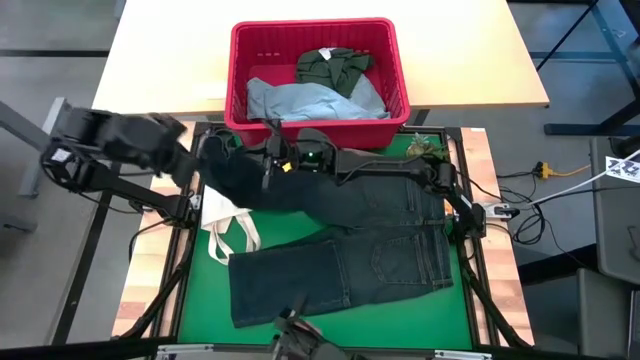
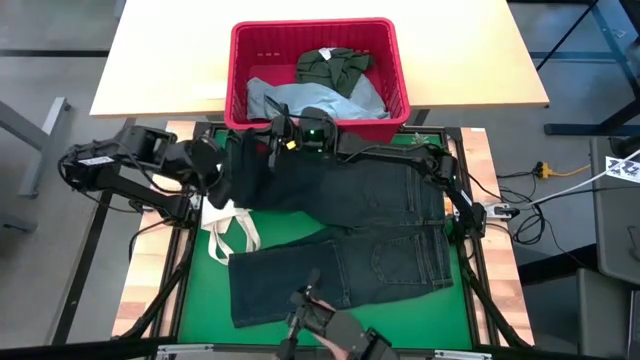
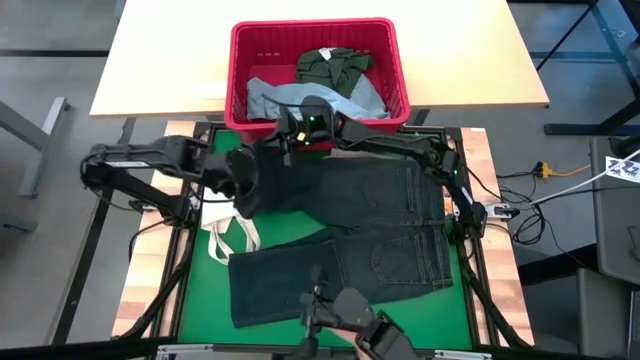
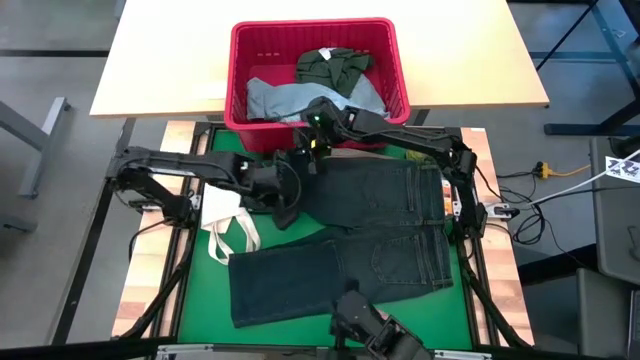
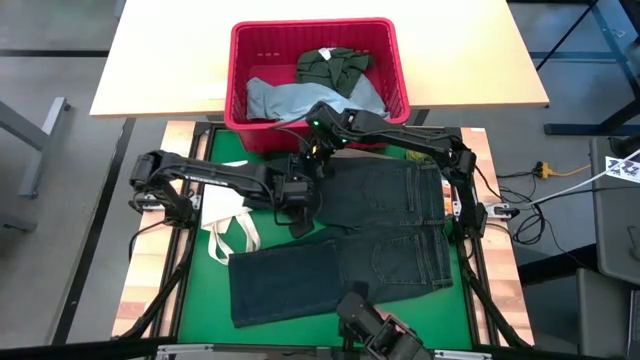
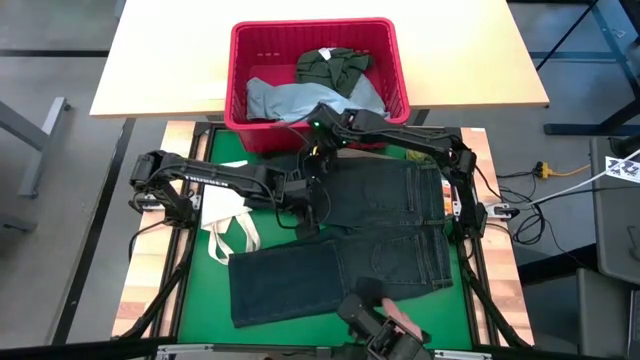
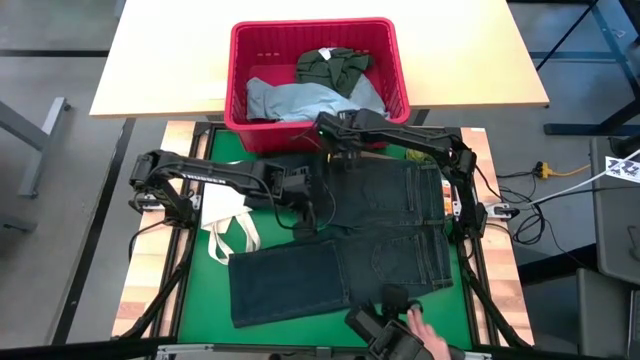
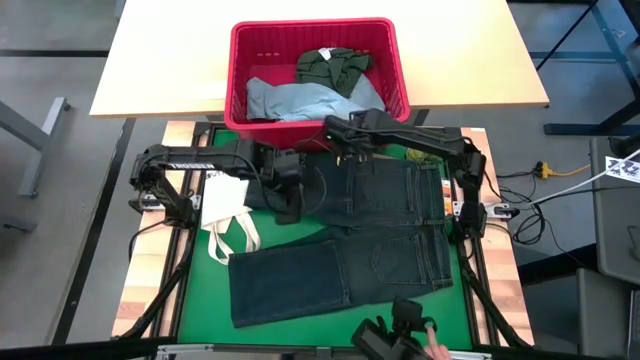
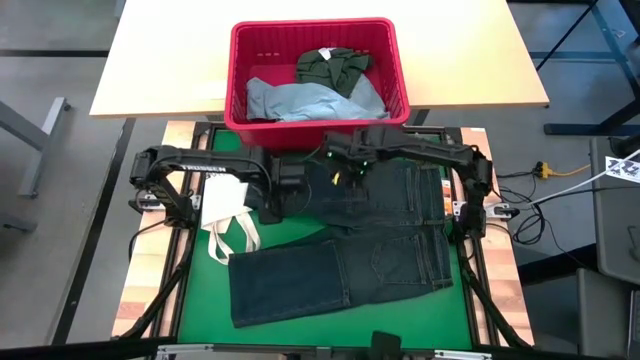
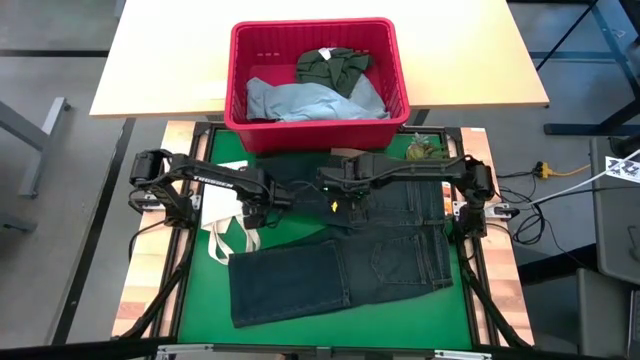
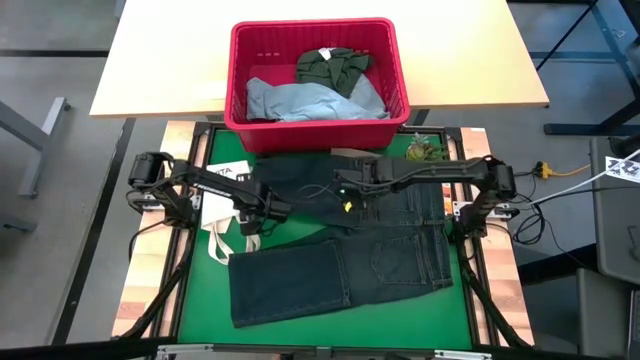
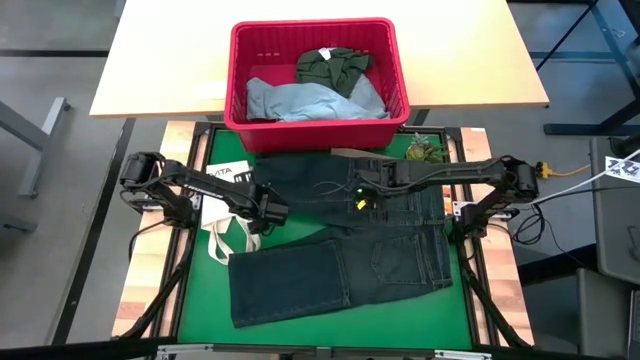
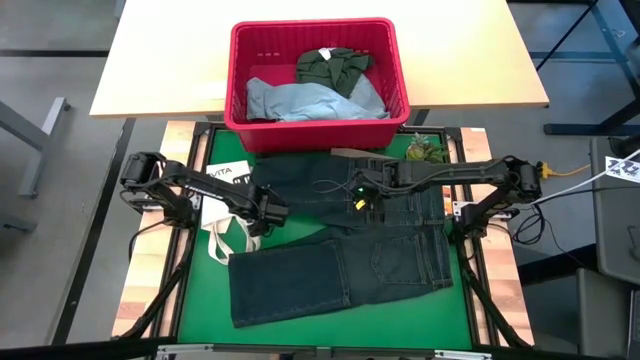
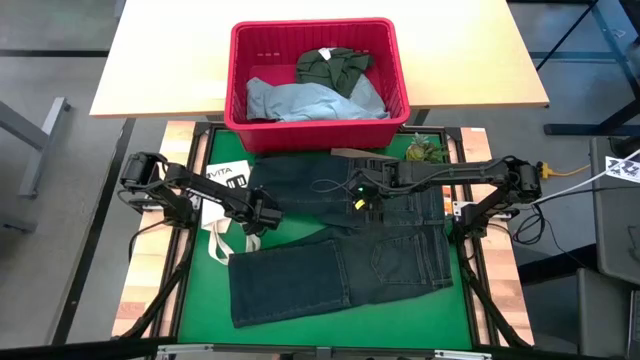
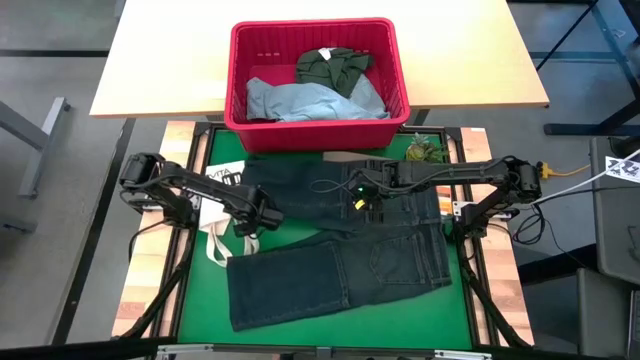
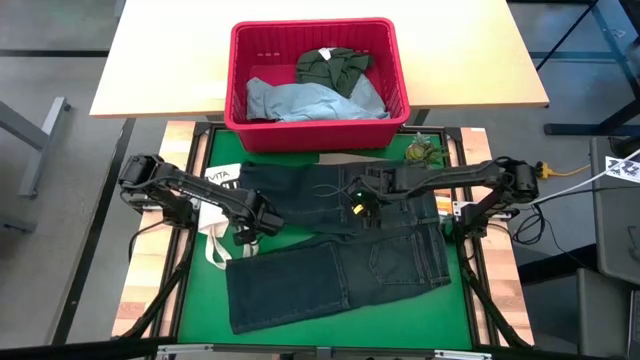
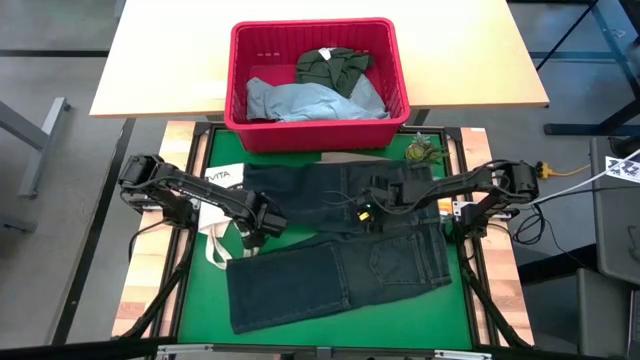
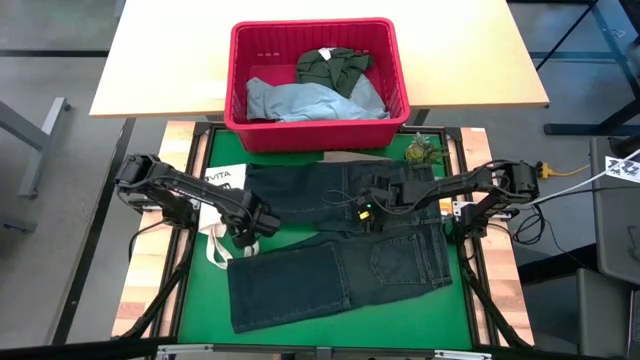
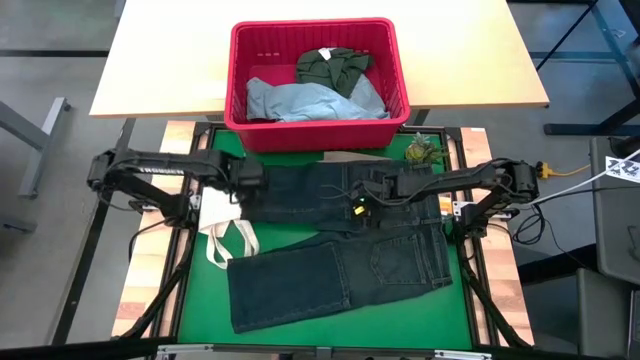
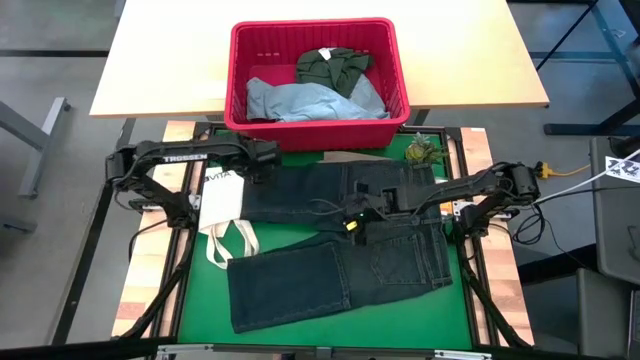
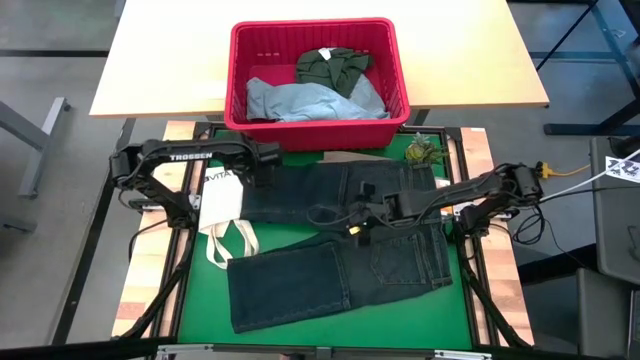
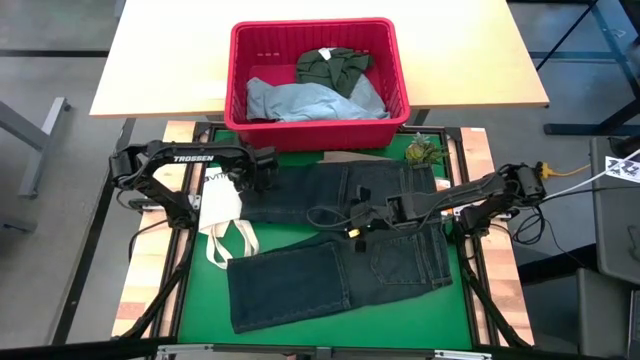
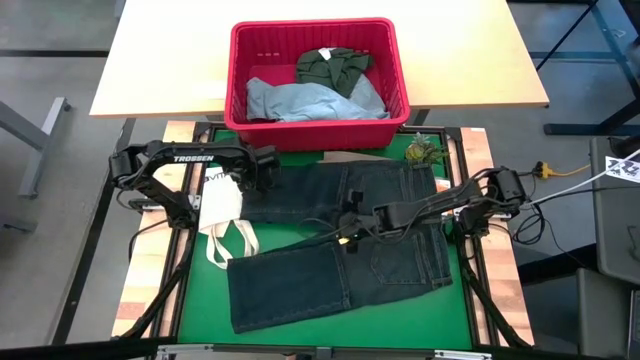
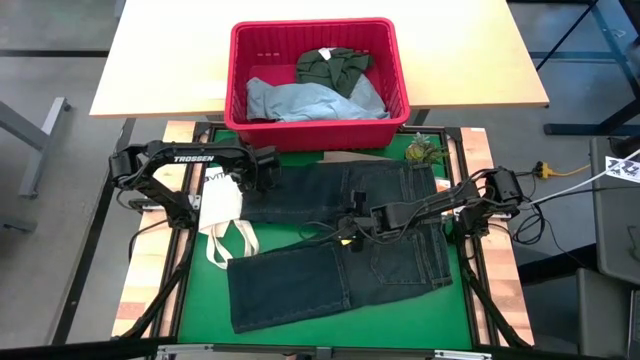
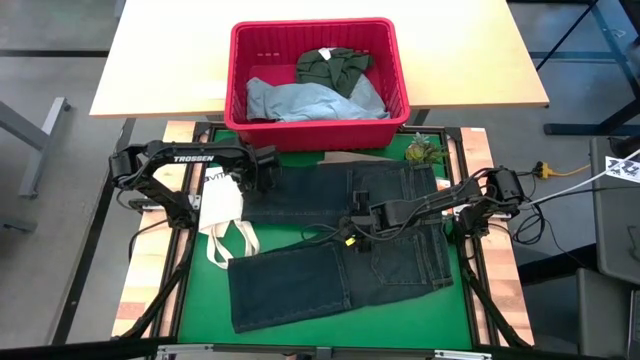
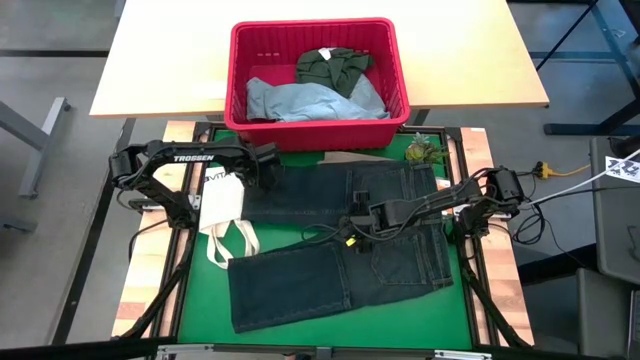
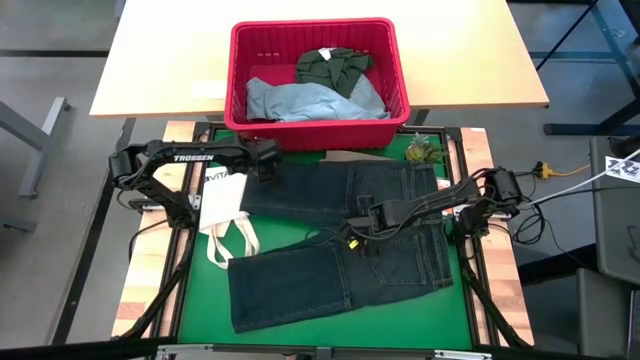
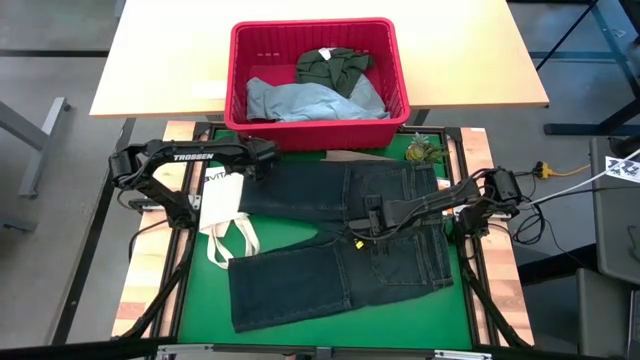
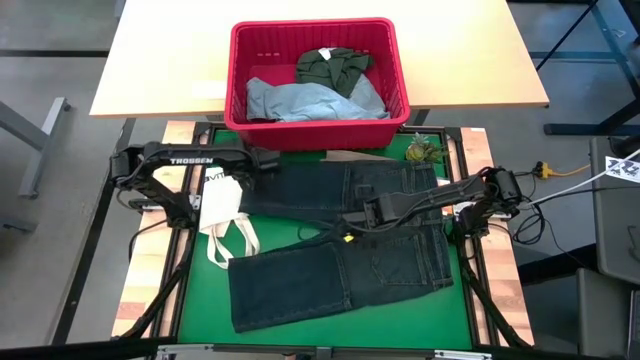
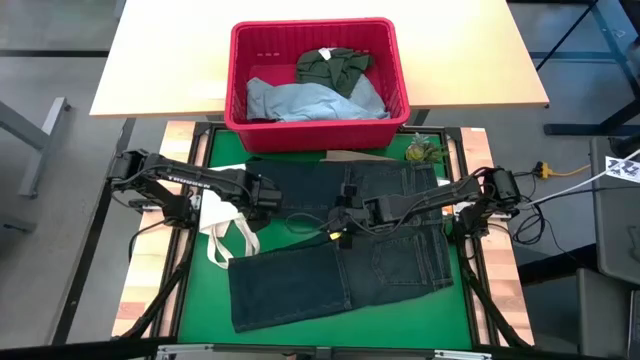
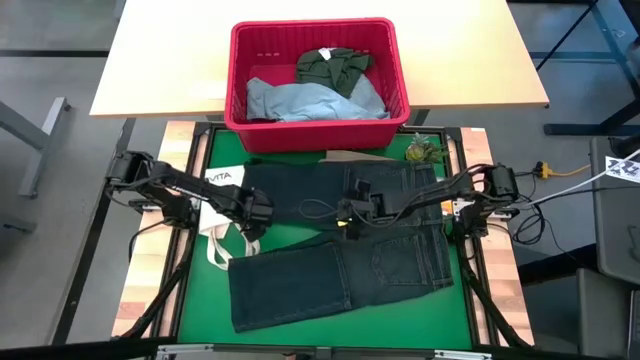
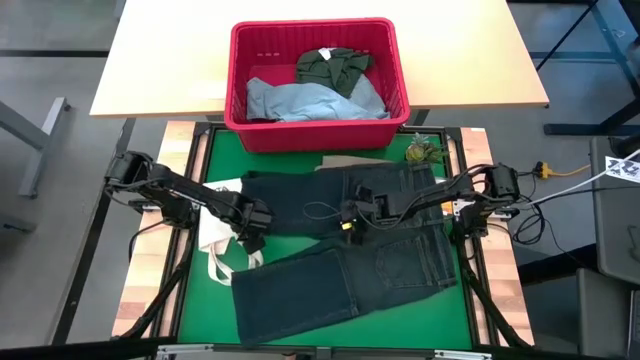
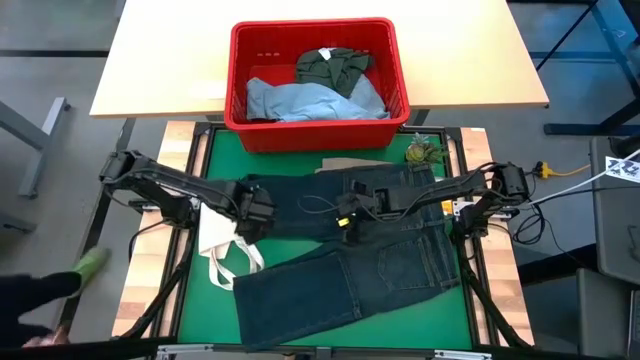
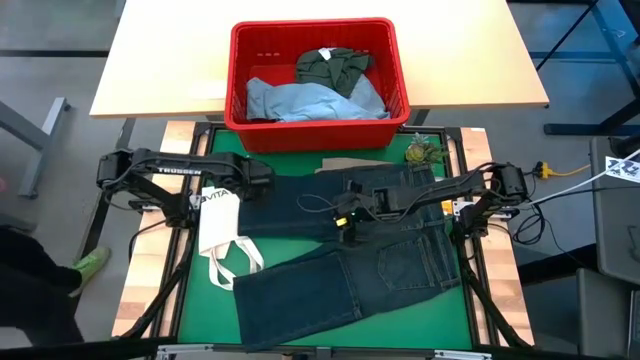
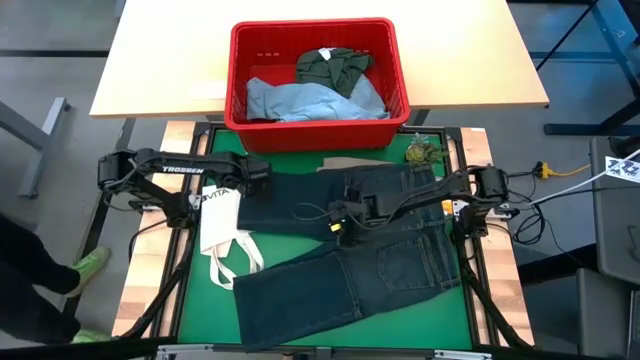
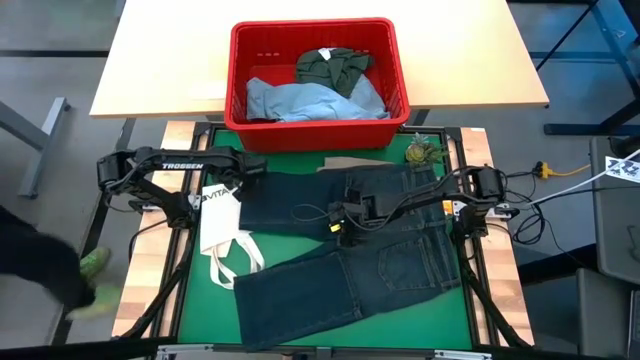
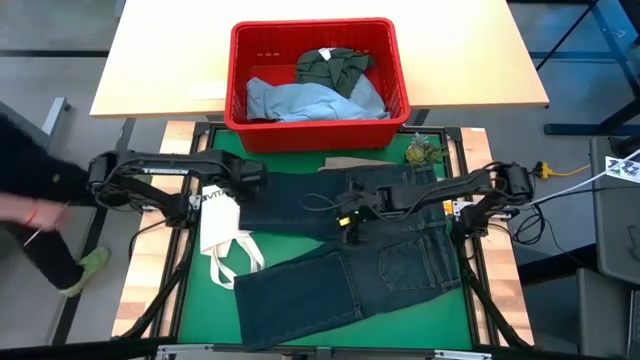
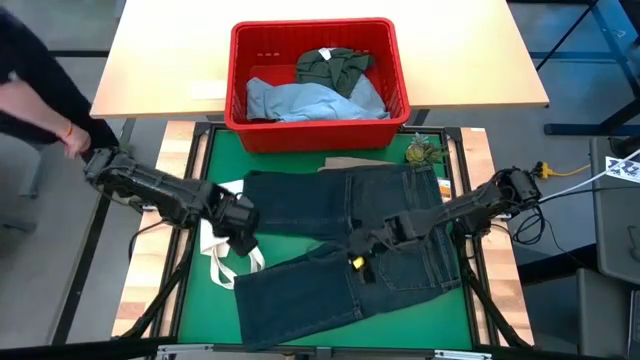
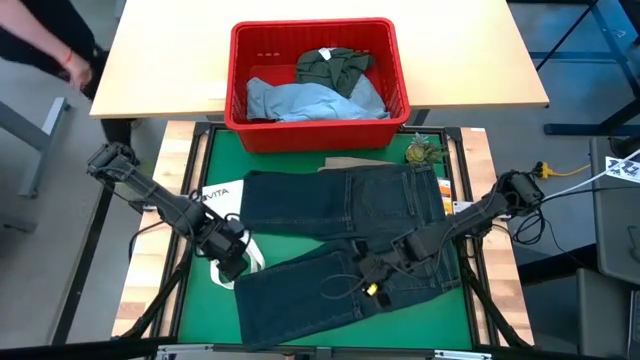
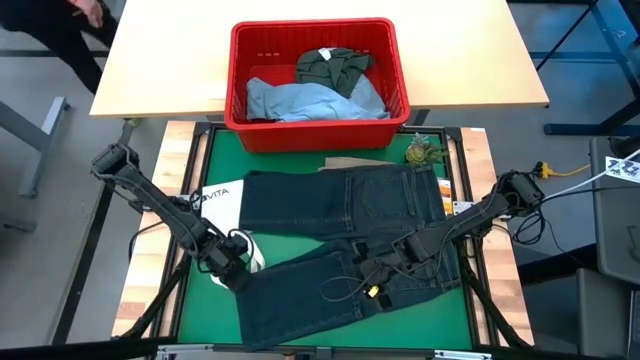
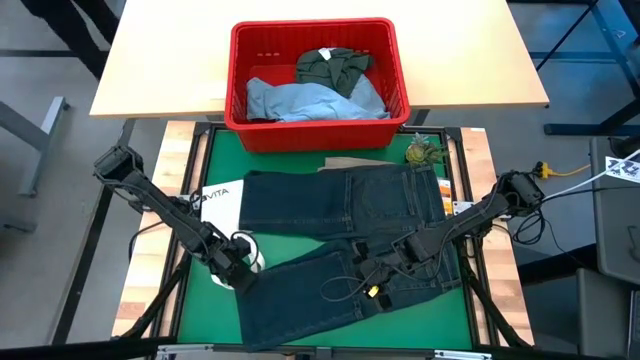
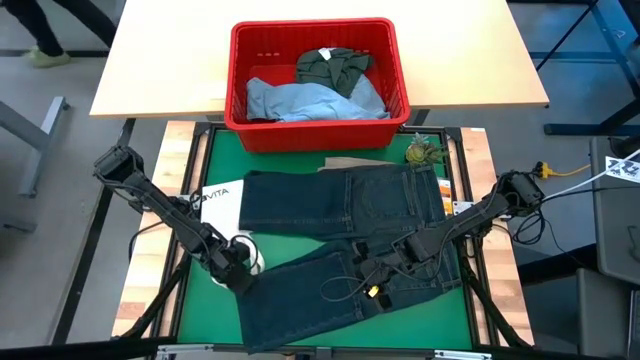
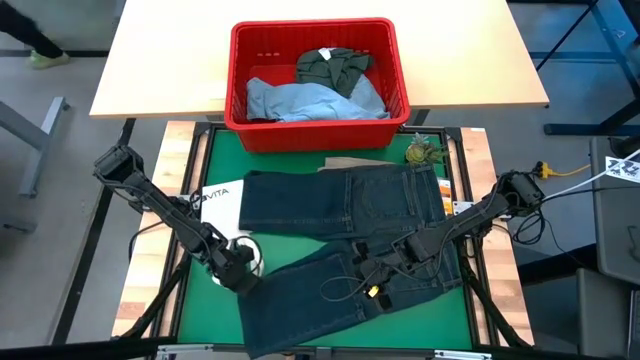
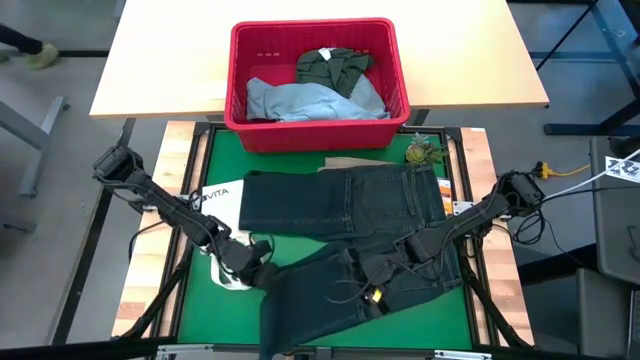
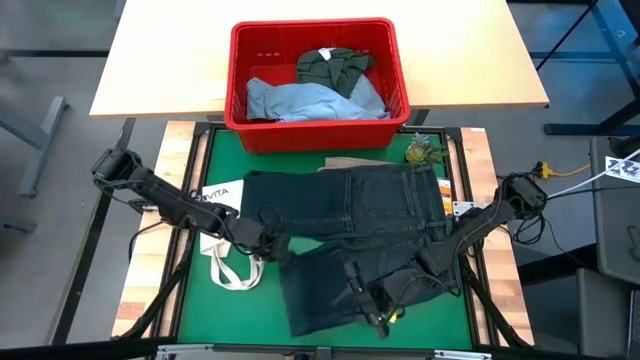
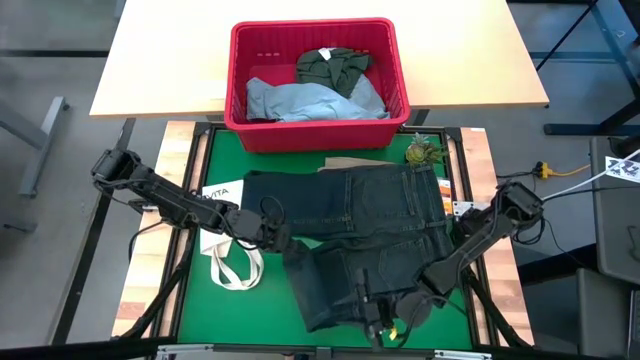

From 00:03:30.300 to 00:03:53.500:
Task: Fold Laundry from Bin
Fold the dark blue jeans
